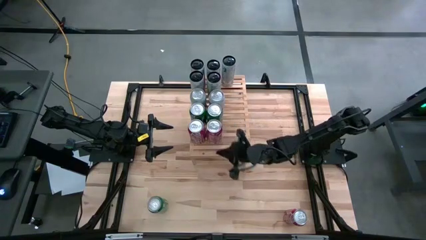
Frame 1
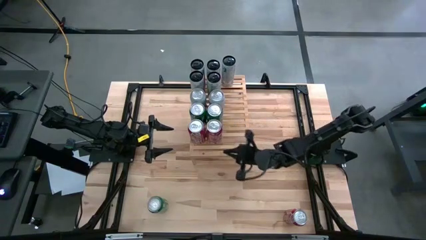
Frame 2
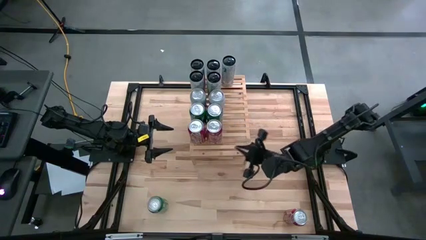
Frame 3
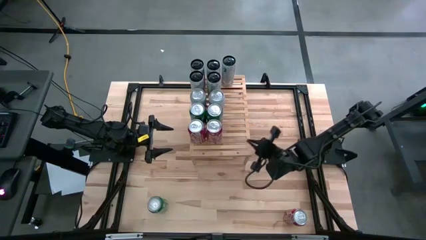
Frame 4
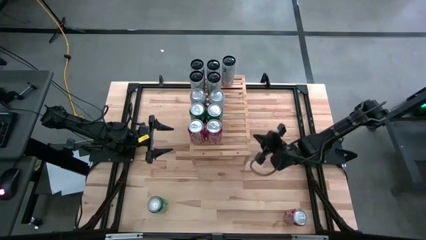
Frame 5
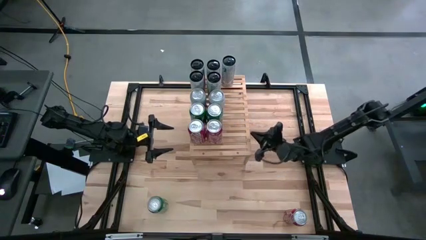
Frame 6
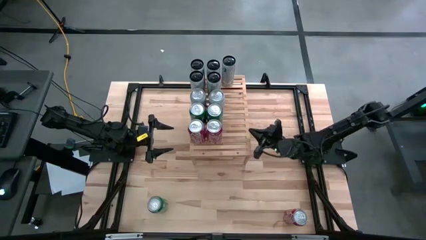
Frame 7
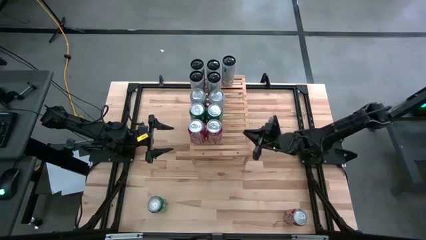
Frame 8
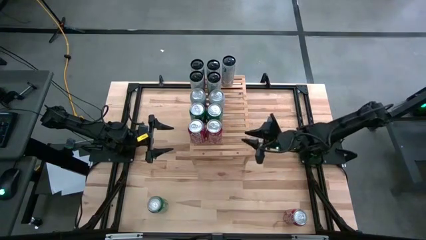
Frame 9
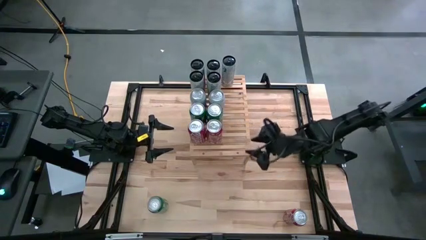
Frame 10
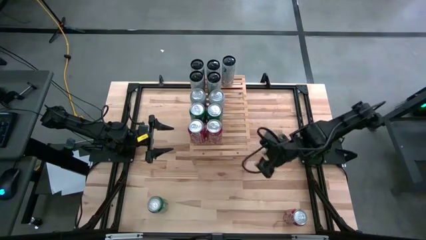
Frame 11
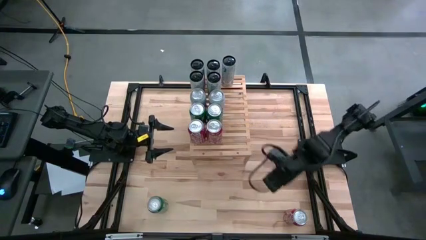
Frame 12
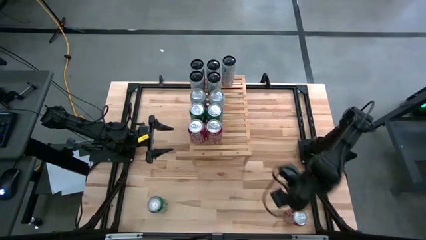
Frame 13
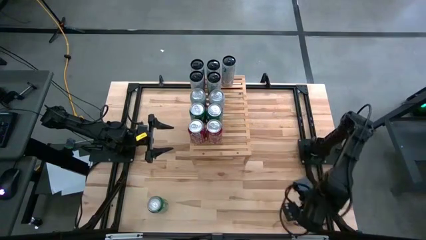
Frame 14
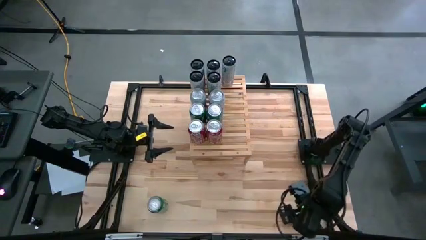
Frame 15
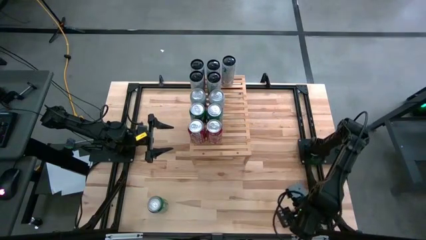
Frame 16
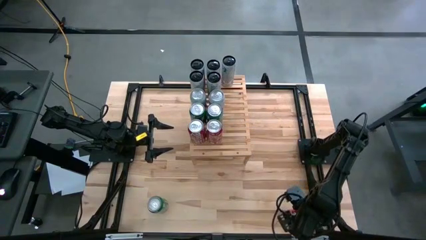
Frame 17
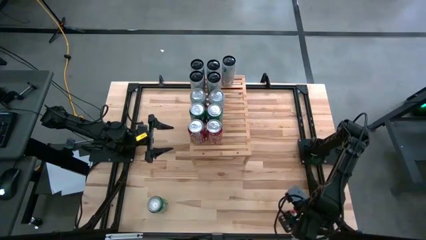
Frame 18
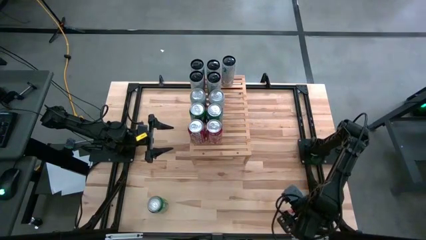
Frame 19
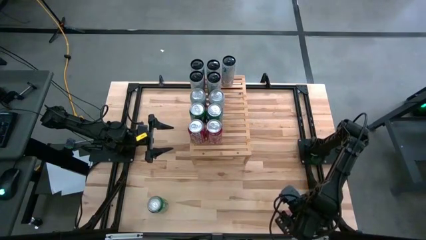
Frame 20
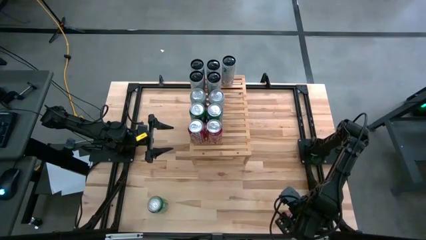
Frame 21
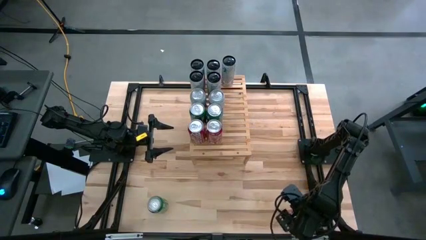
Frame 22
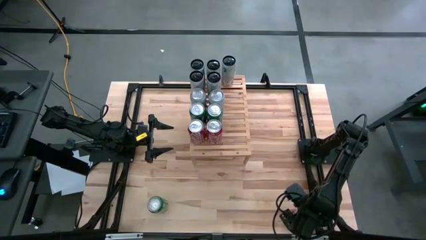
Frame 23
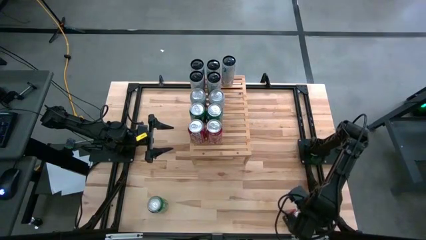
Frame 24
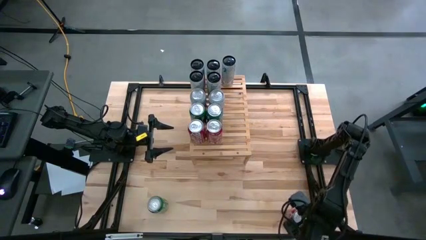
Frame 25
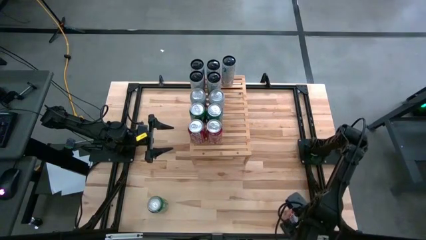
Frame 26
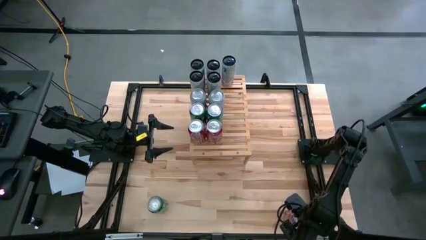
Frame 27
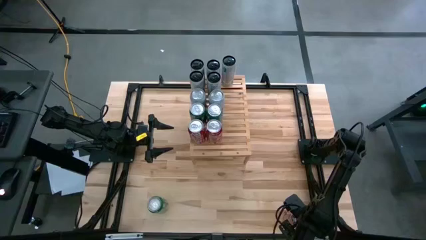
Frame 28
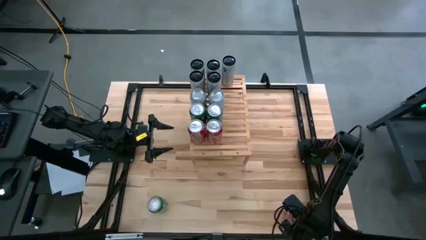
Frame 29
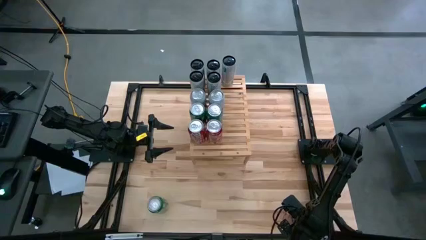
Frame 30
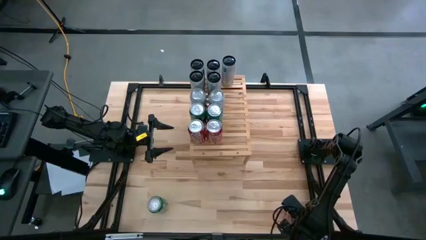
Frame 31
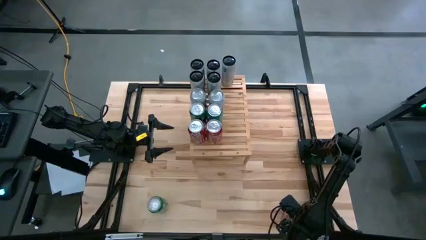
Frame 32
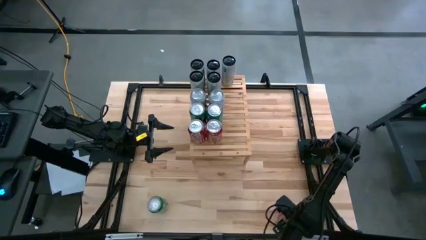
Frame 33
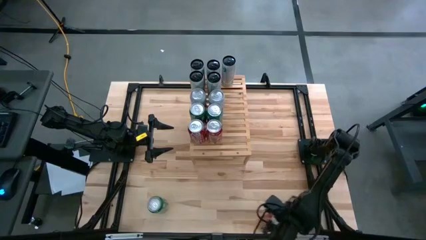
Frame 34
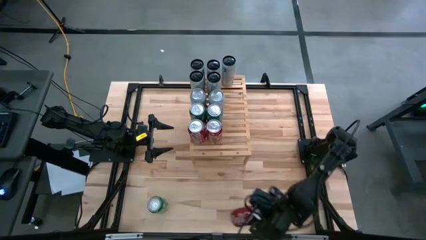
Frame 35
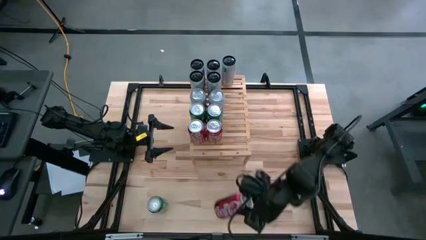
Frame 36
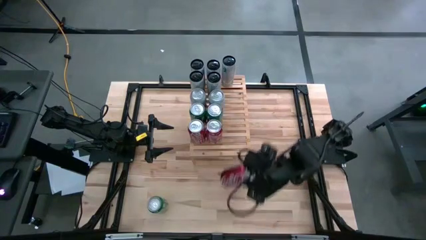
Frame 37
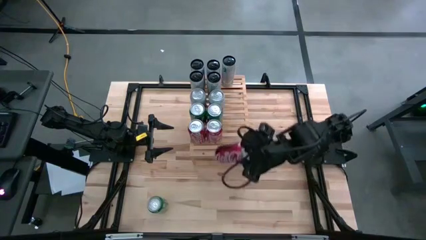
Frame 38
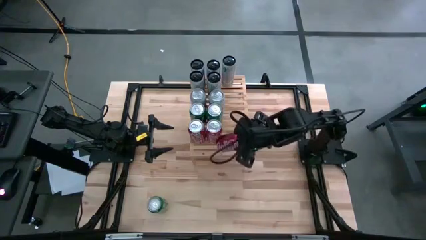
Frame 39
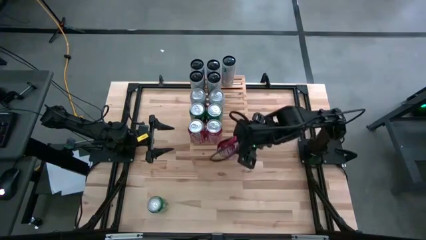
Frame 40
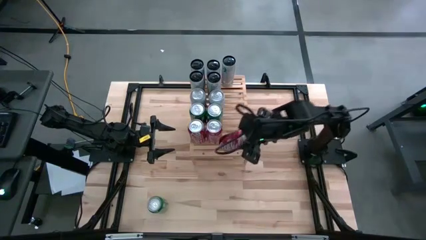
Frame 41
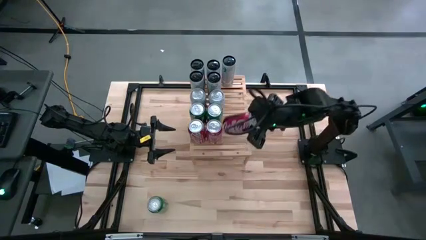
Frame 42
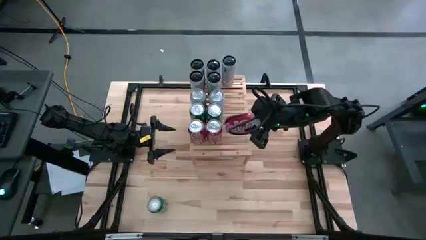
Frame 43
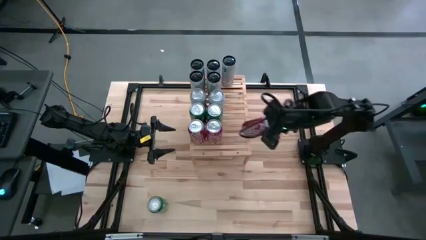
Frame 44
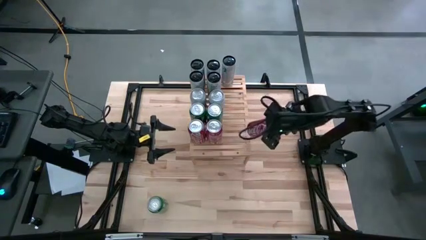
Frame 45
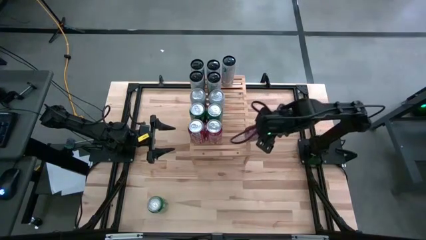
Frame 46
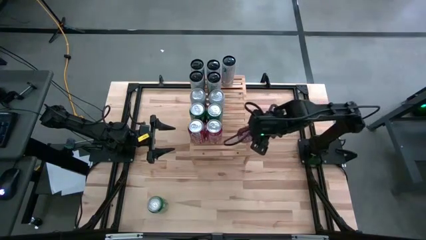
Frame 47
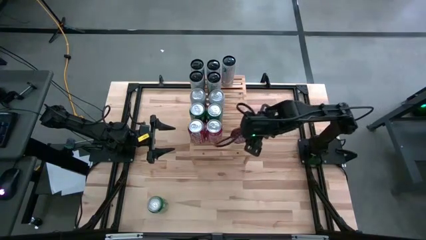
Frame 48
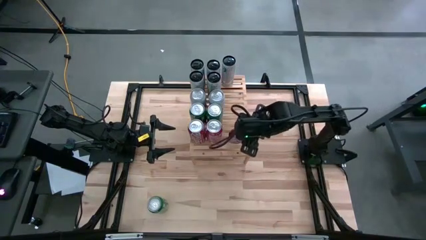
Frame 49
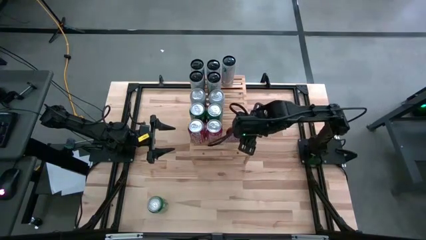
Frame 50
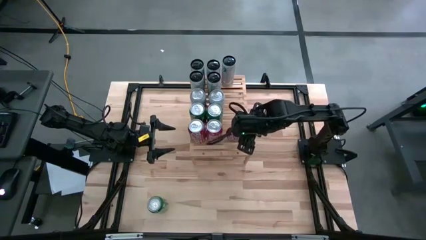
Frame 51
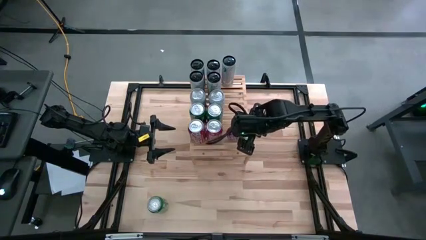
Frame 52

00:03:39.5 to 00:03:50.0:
Task: Place canned beverage on shelf
Put the red soda can aligned with the other red soda cans on the shelf

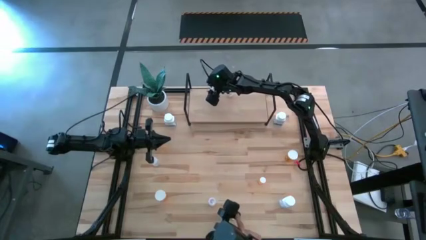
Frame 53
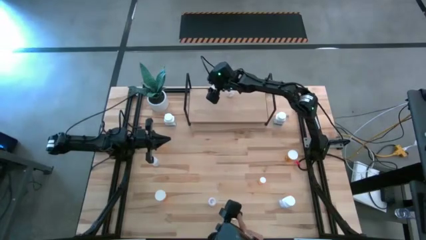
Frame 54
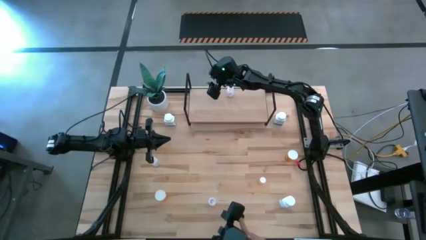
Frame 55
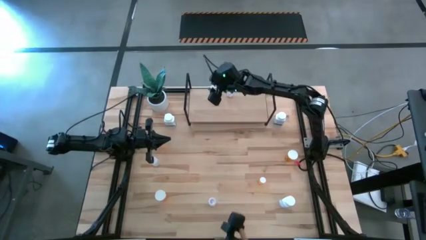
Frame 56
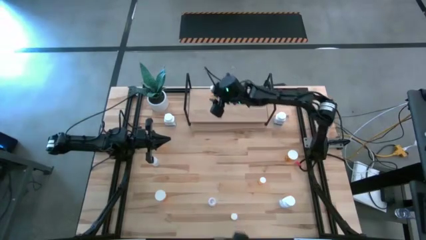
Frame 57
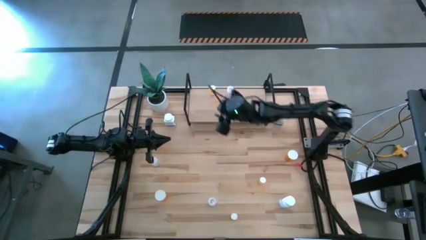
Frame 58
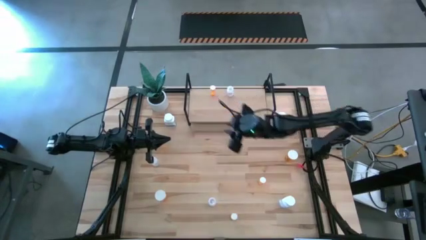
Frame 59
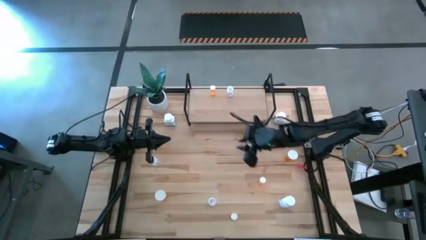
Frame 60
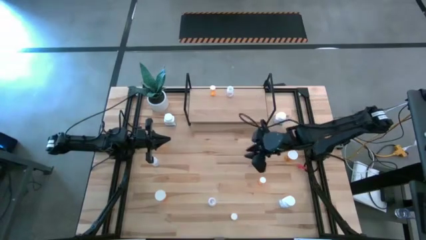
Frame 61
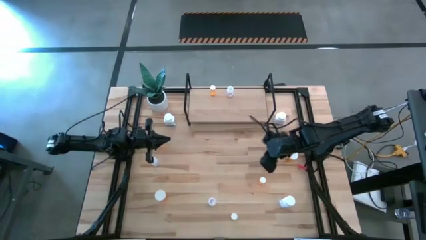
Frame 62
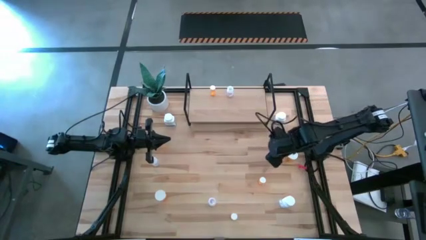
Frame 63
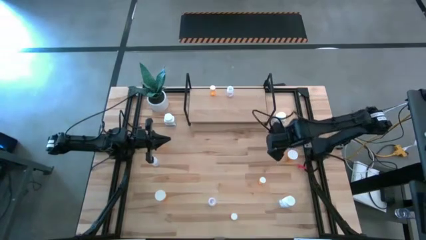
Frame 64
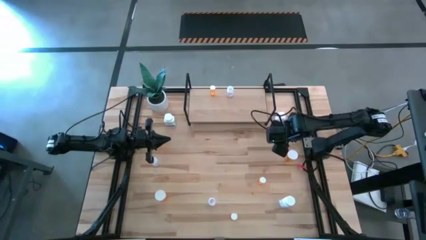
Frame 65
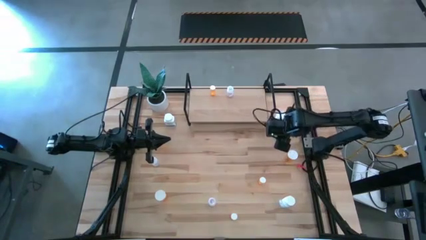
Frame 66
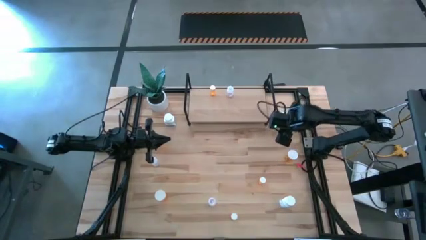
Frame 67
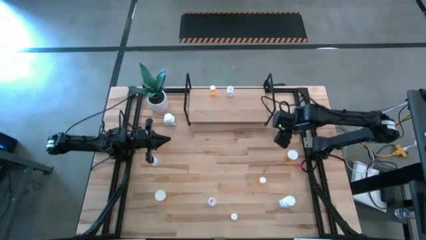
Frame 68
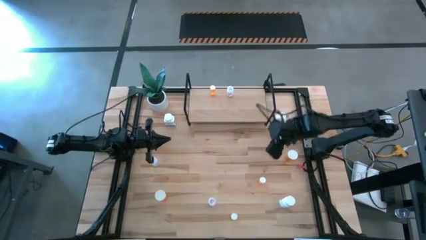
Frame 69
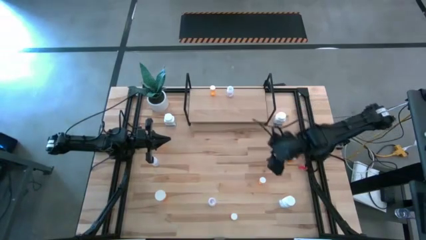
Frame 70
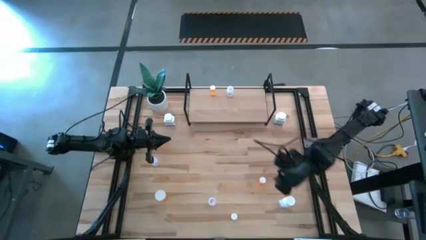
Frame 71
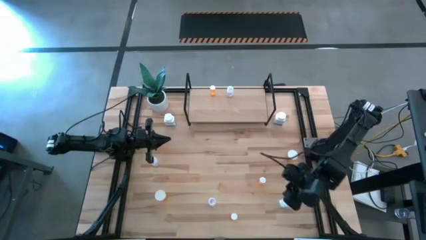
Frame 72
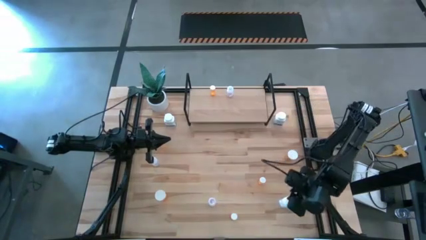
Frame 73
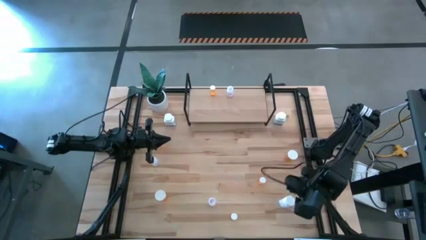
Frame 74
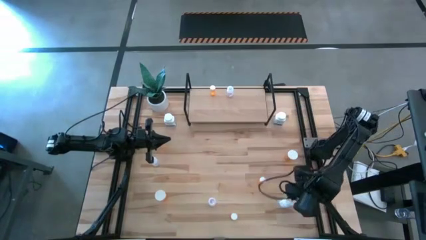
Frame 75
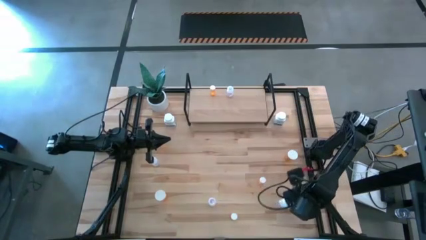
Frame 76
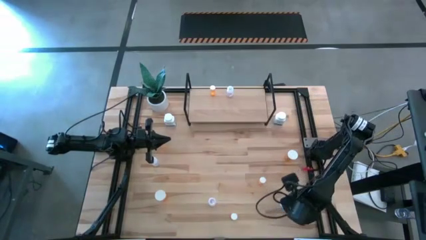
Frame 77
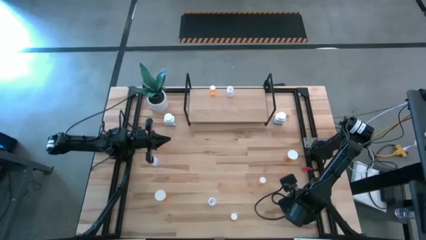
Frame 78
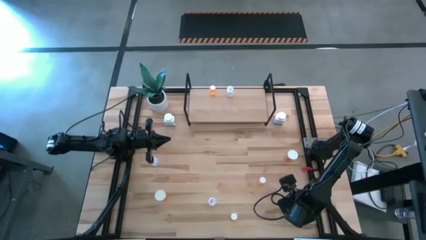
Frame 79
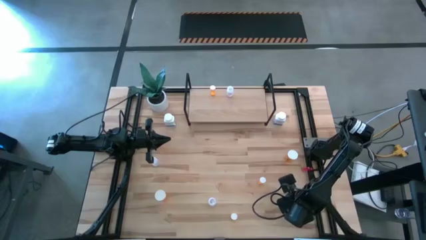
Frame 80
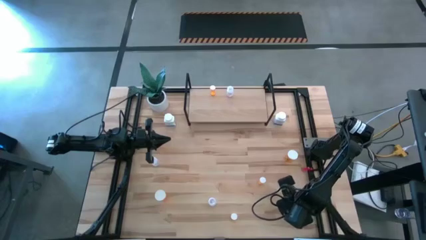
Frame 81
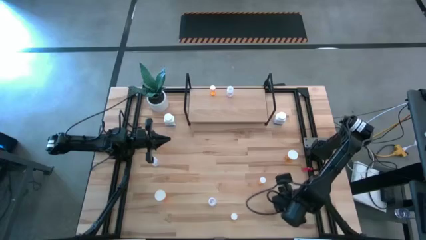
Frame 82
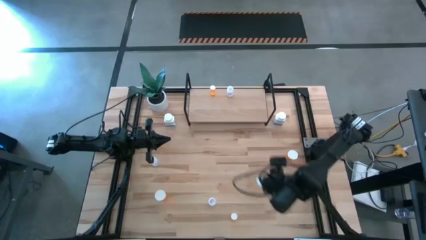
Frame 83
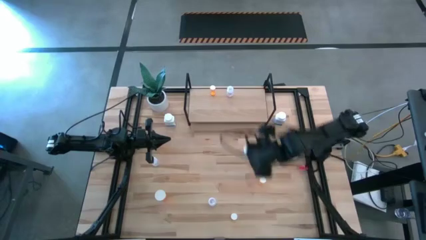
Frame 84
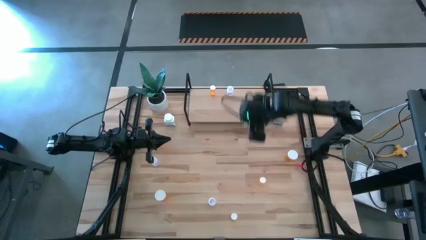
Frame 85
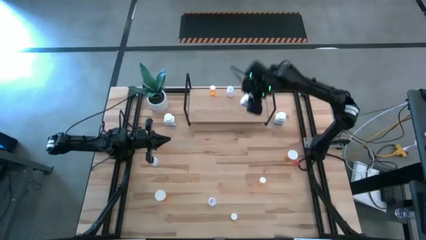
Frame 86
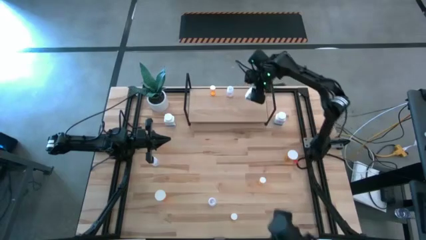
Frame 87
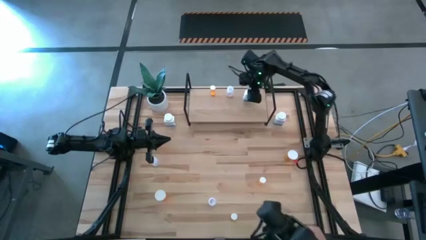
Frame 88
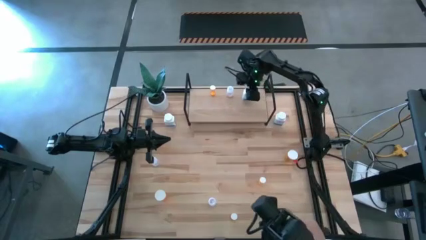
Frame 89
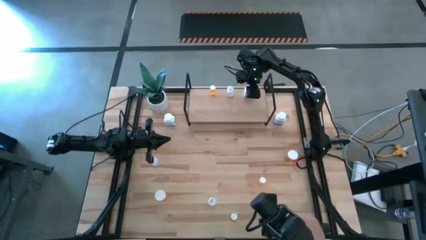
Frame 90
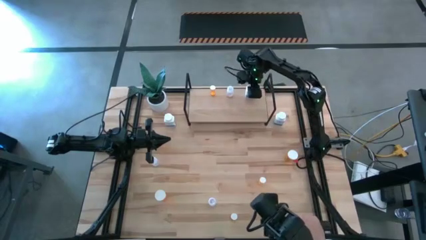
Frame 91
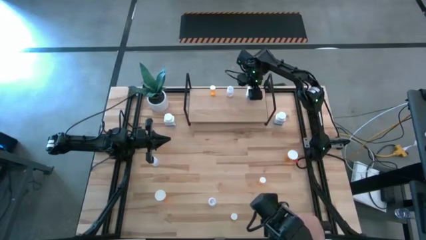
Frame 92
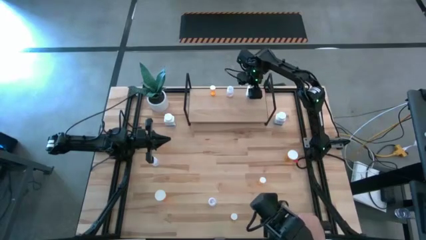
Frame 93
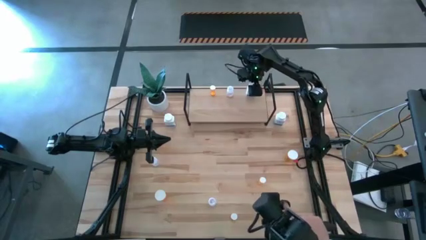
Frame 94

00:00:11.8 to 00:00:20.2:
Task: Pick and place medicine bottles onto shelf by color
Put the bottom white pill bottle on the shelf
